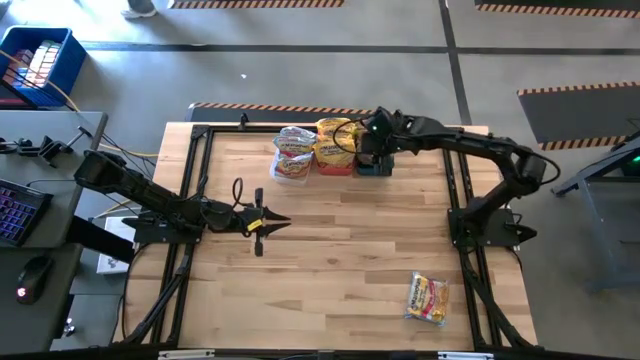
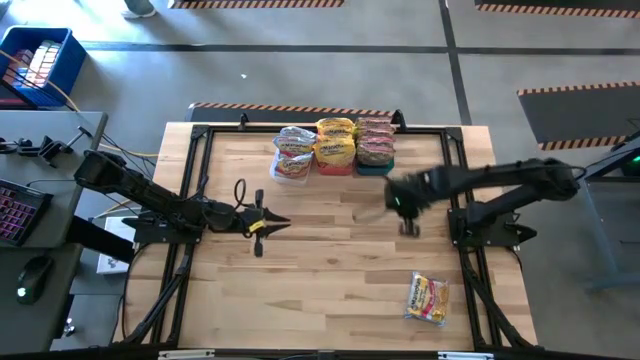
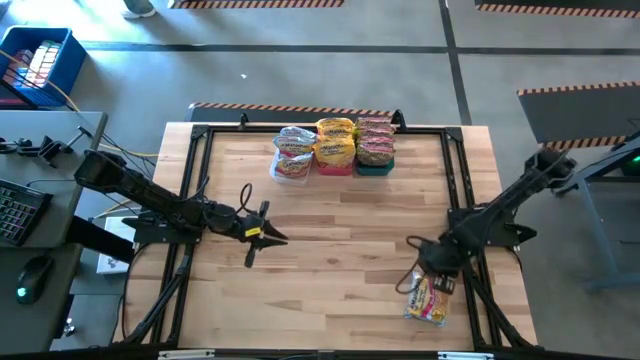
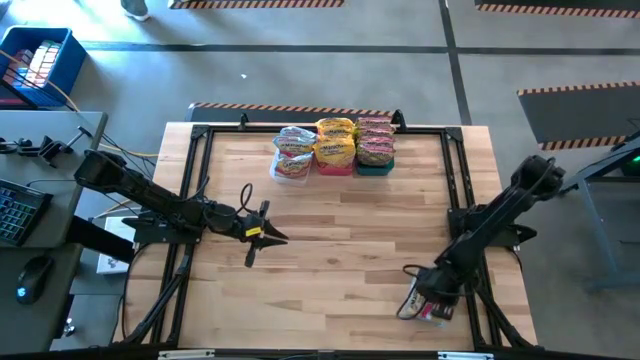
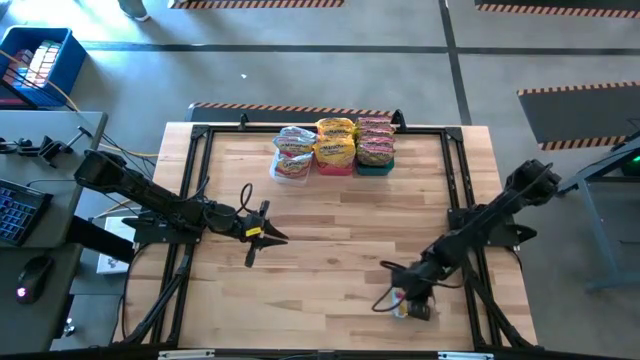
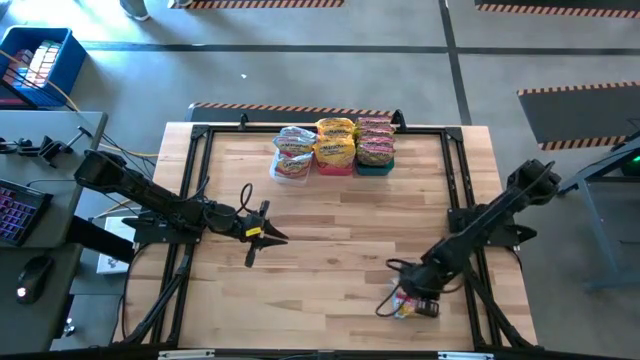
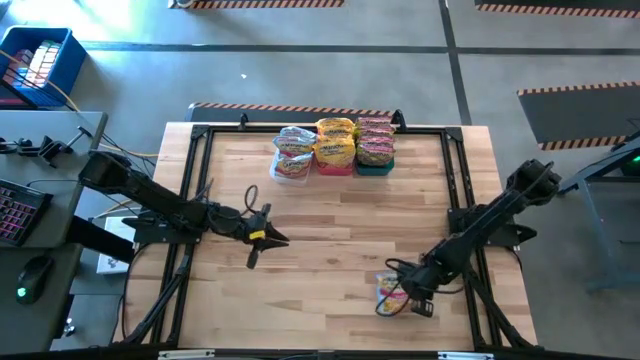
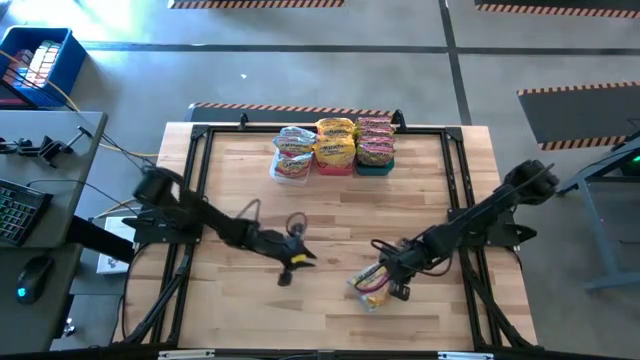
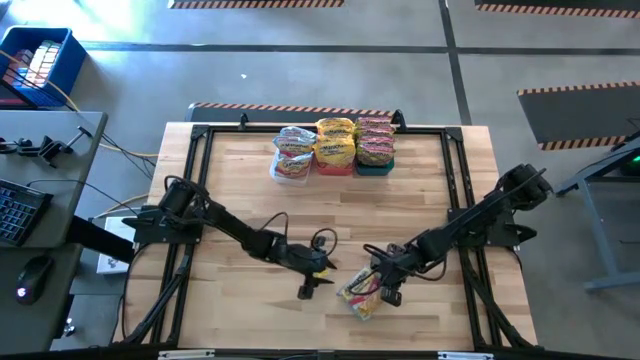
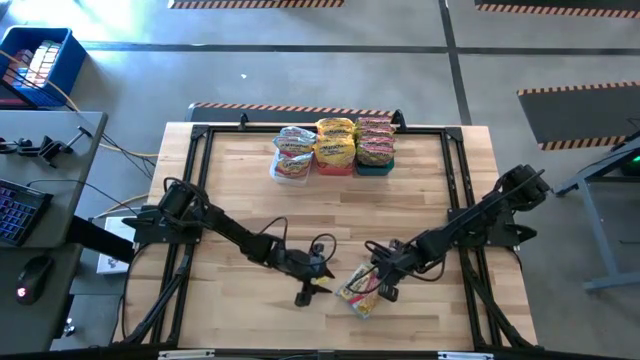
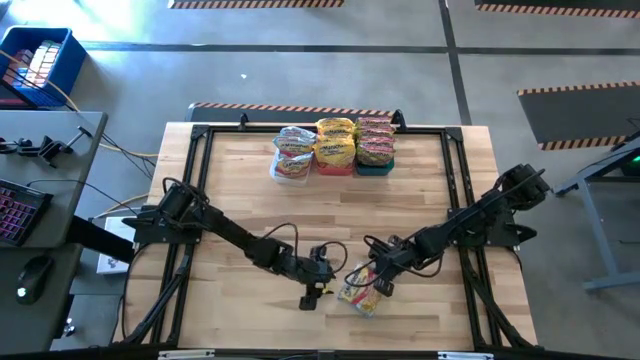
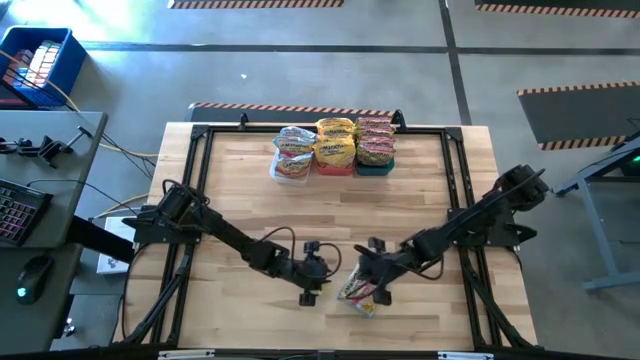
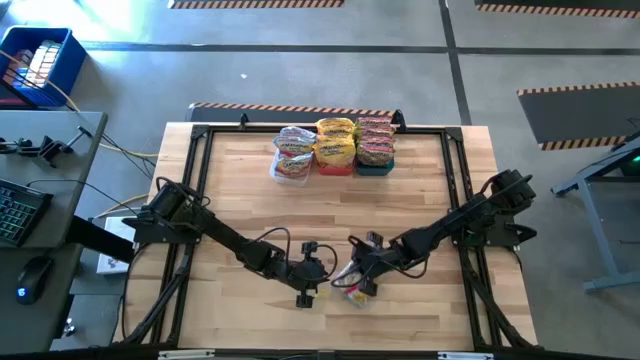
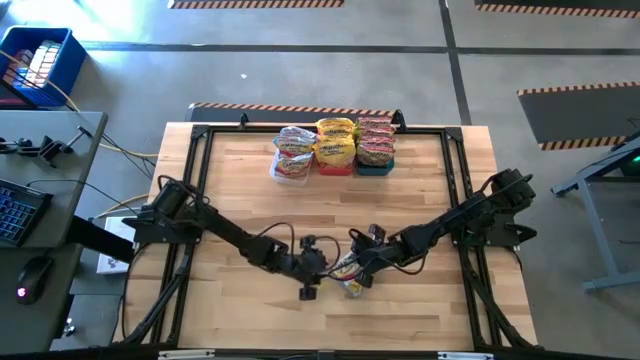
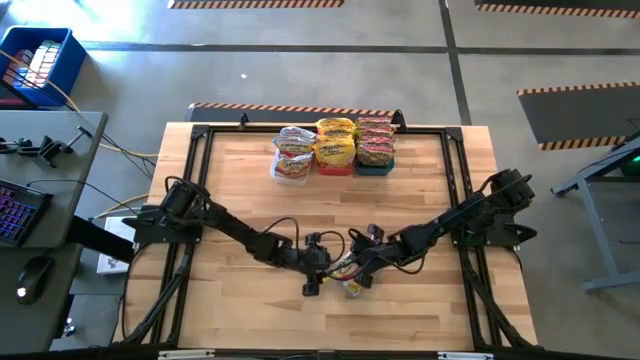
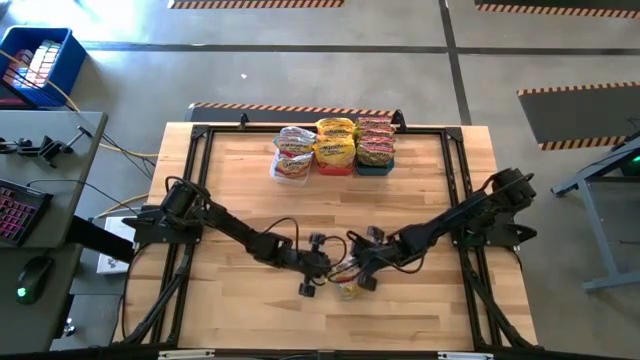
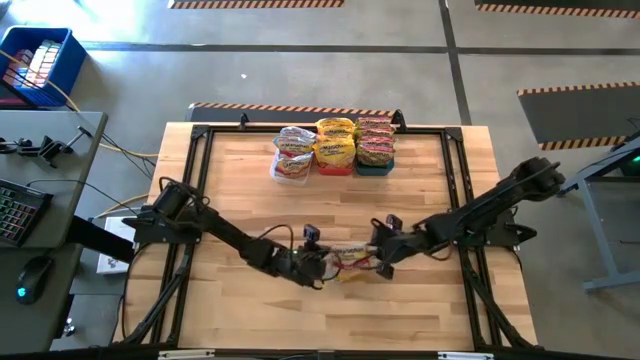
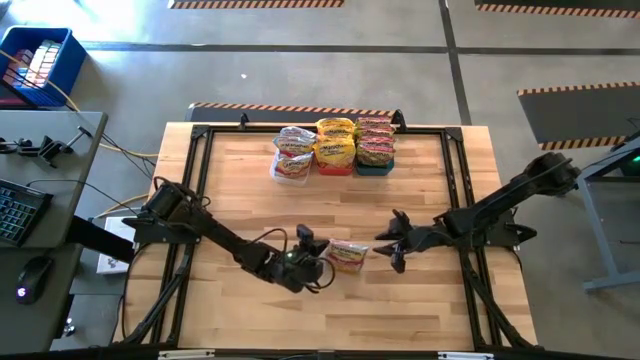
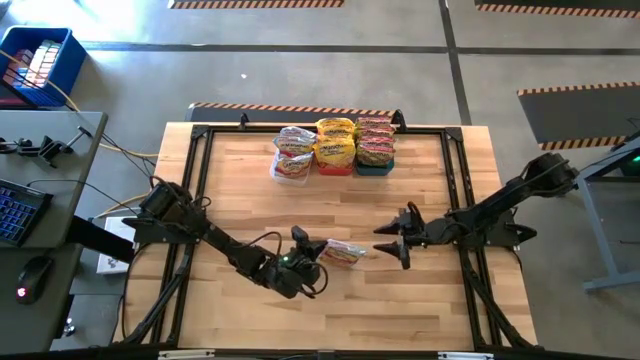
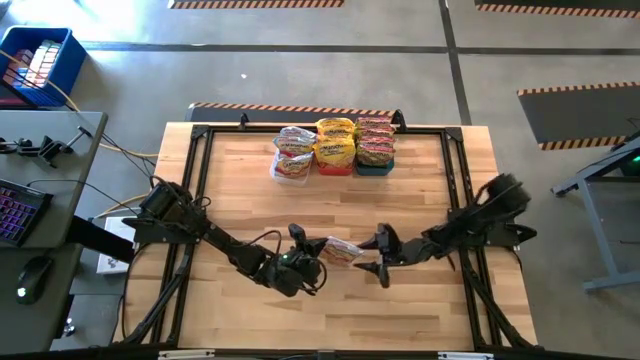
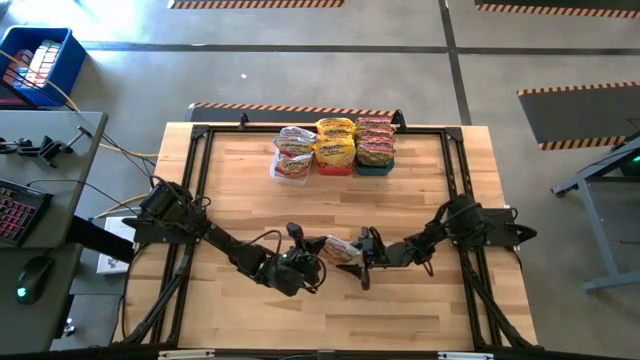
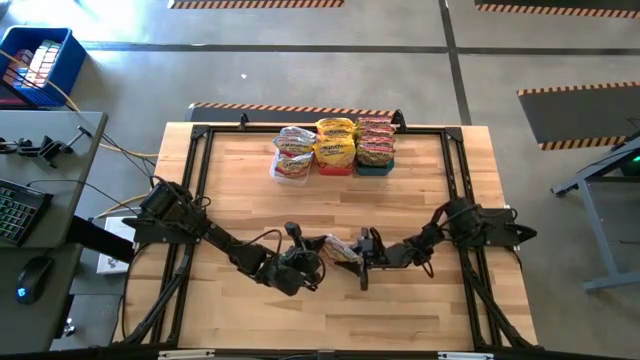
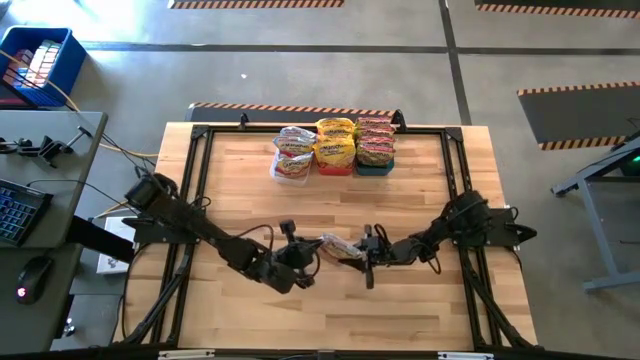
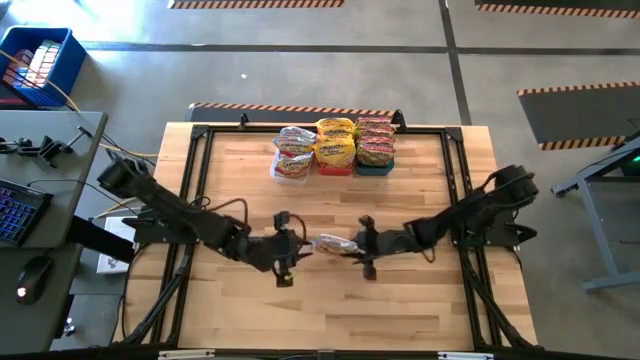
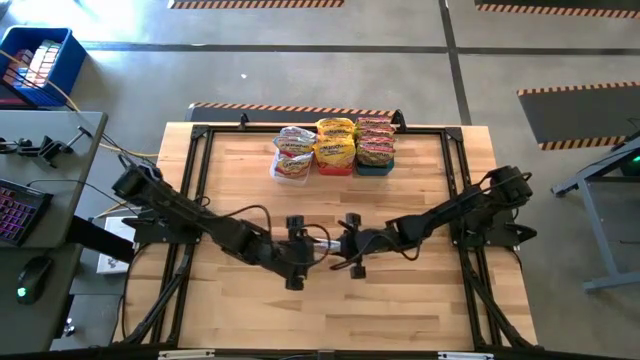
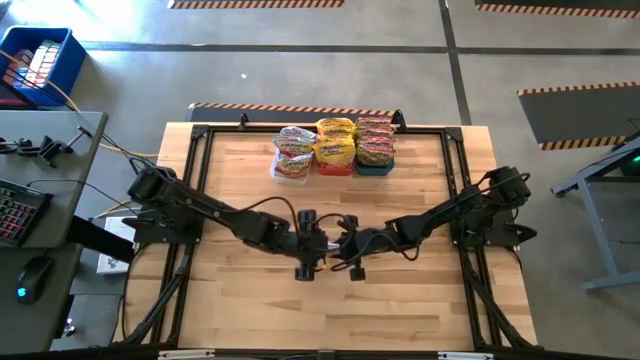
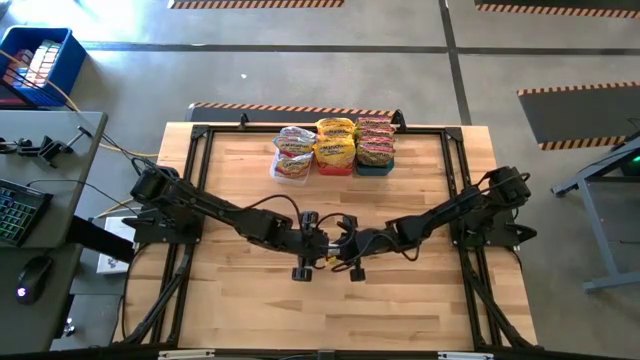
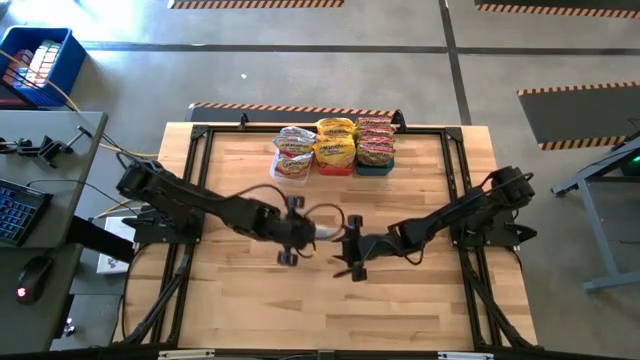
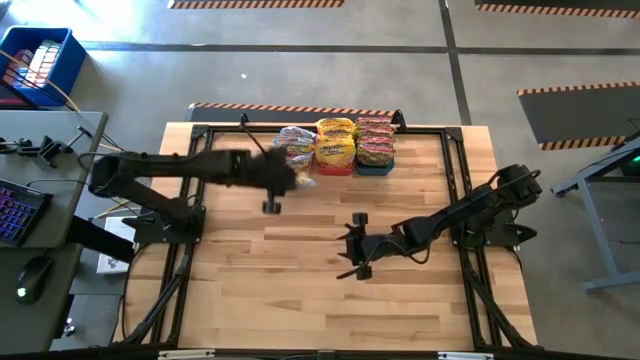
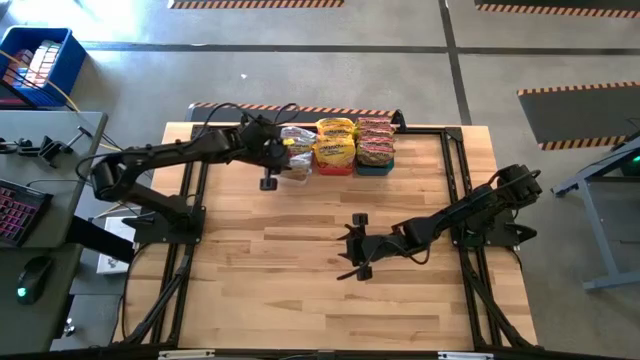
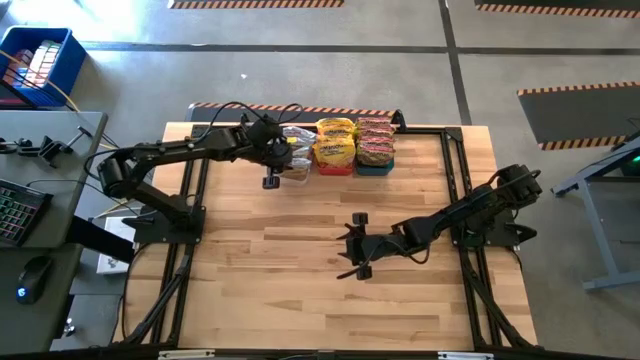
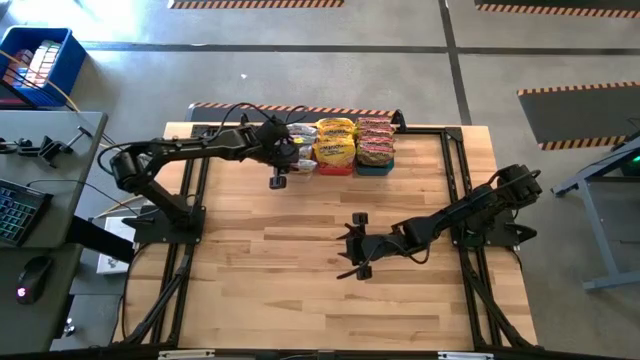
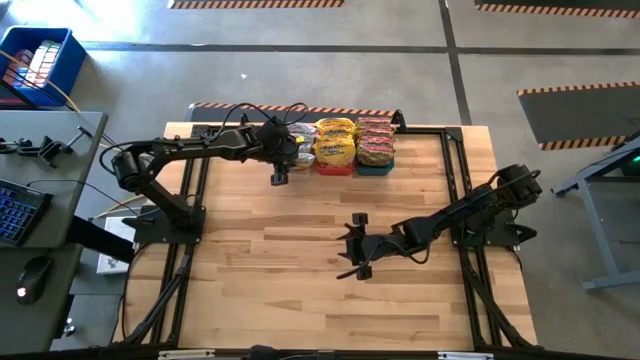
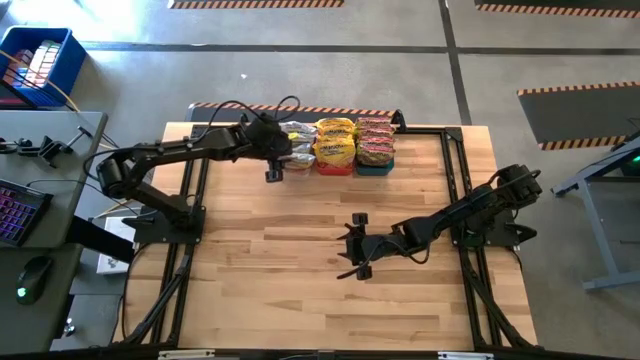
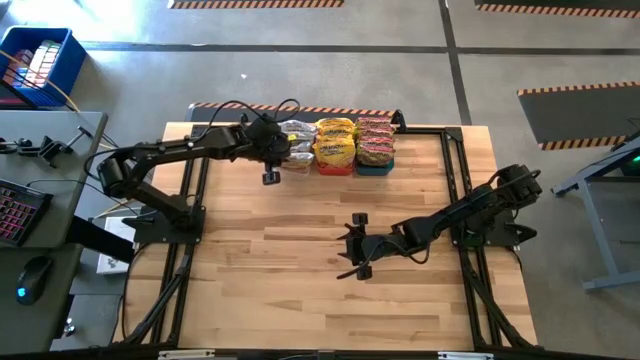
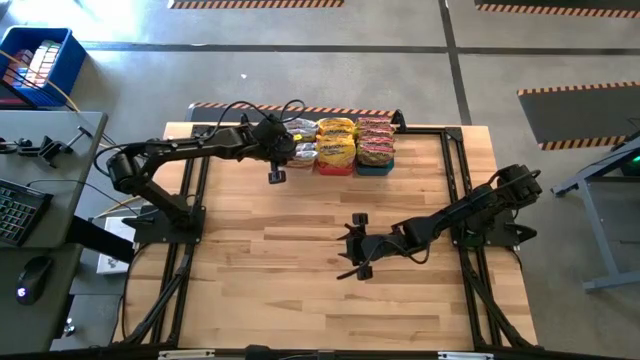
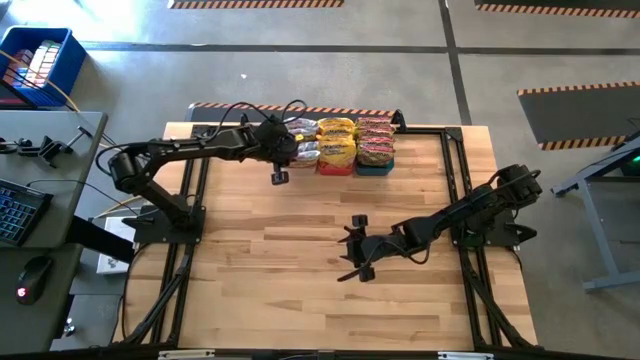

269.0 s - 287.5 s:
Task: Sort Maruchan noodles
Put the blue noodle pack into the transparent bin

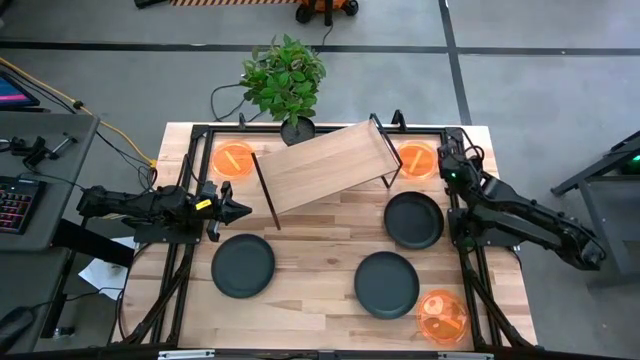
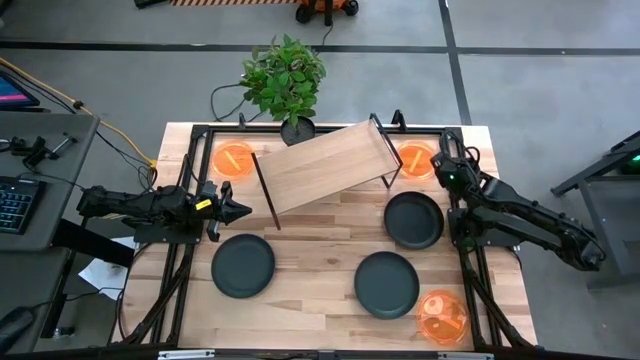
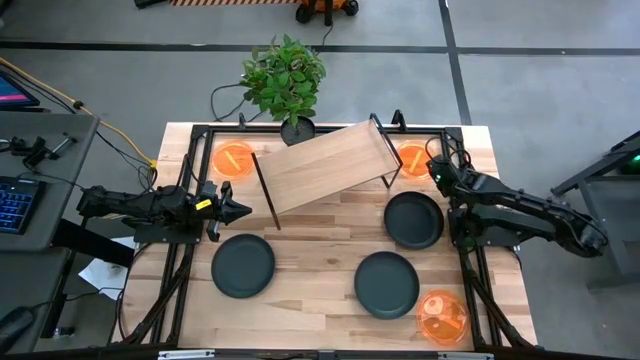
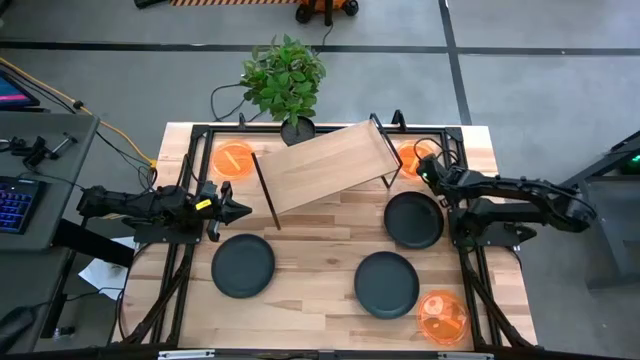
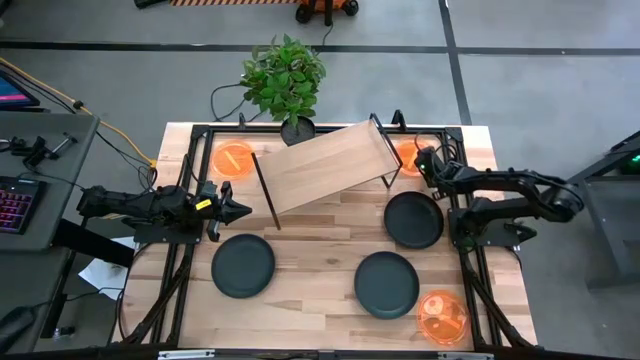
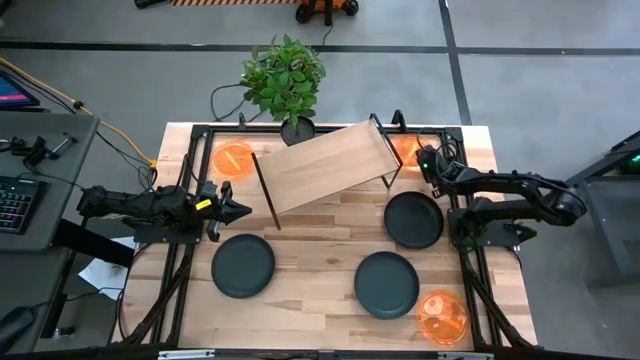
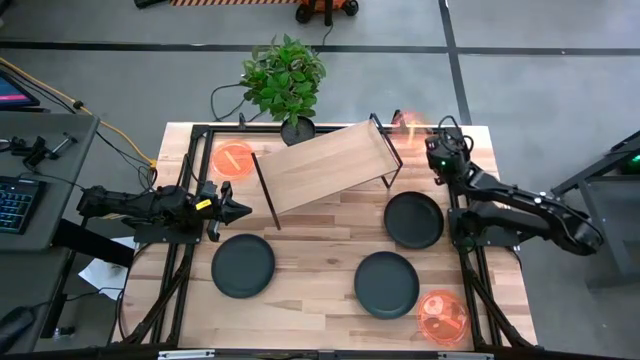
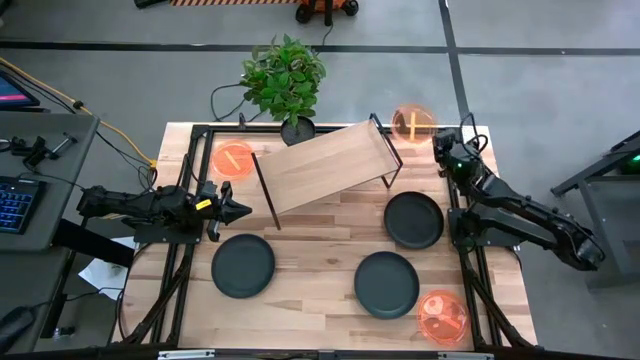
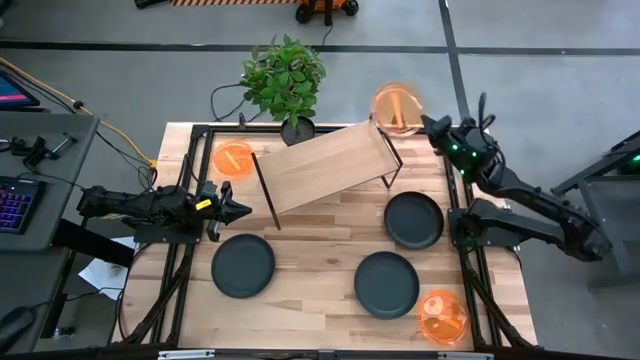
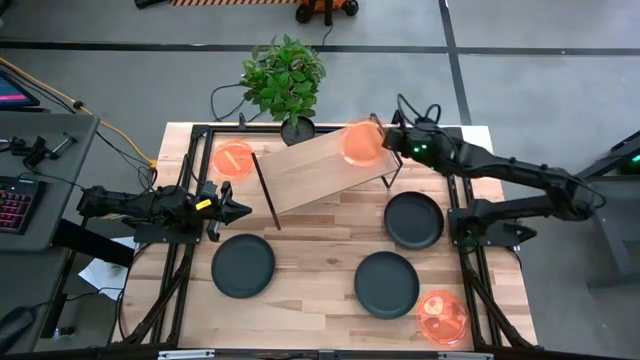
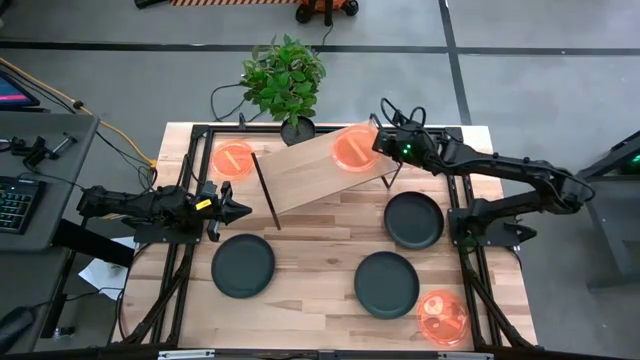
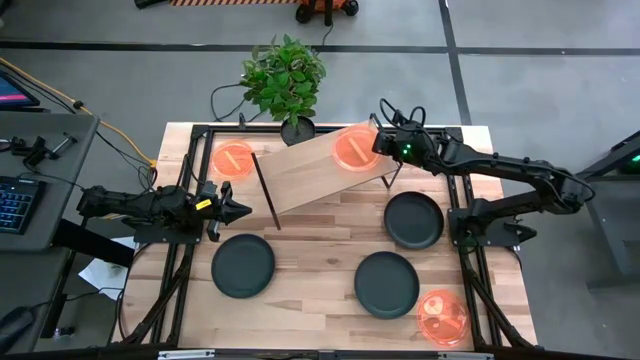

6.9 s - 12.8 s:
Task: Place and stack plates onto a shelf
Put the top right orange plate on the shelf
